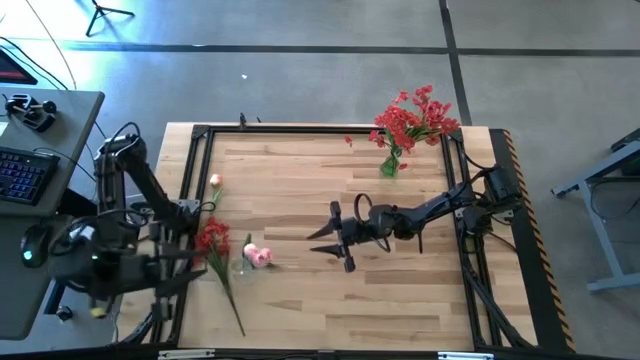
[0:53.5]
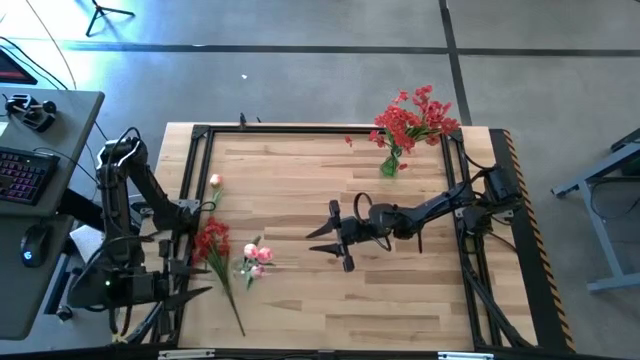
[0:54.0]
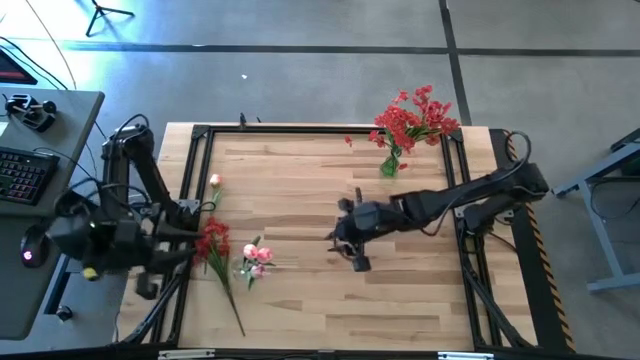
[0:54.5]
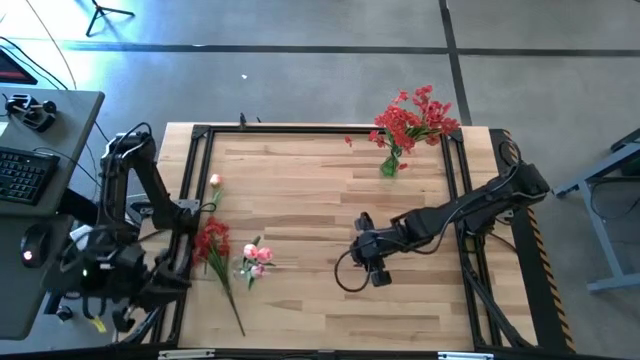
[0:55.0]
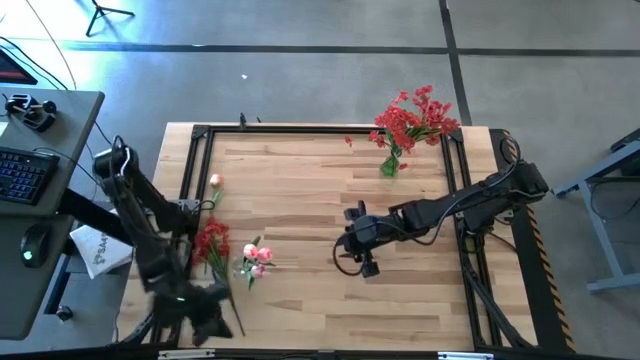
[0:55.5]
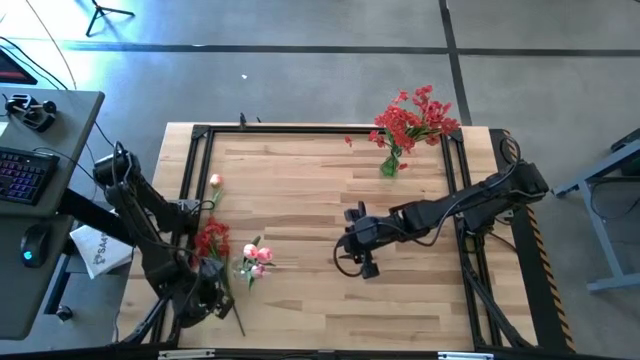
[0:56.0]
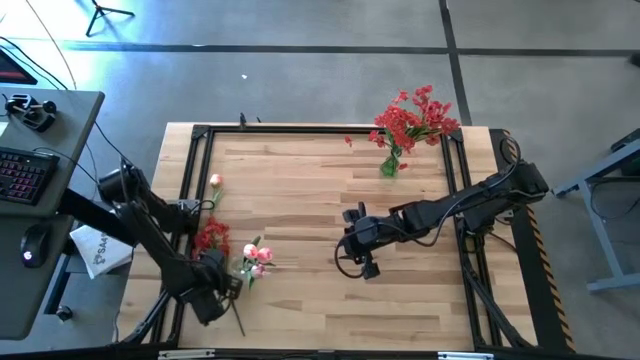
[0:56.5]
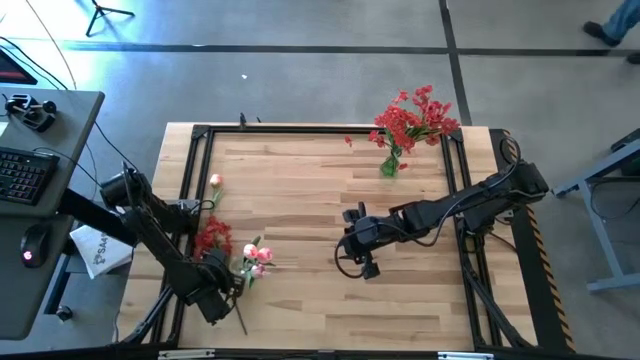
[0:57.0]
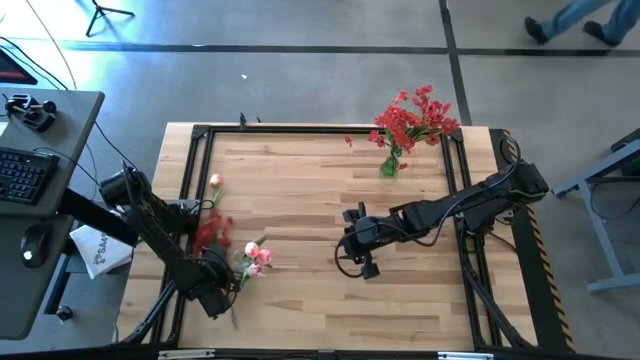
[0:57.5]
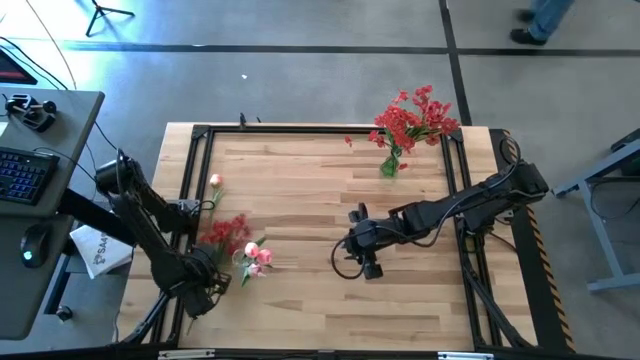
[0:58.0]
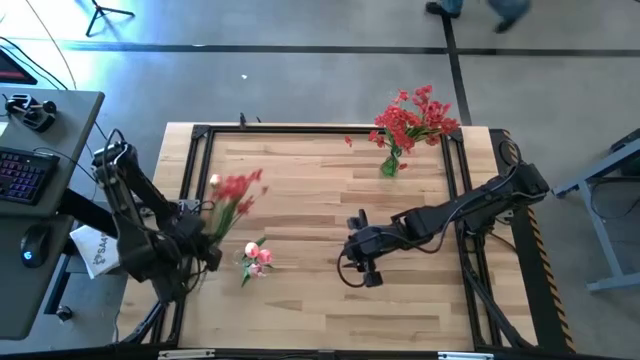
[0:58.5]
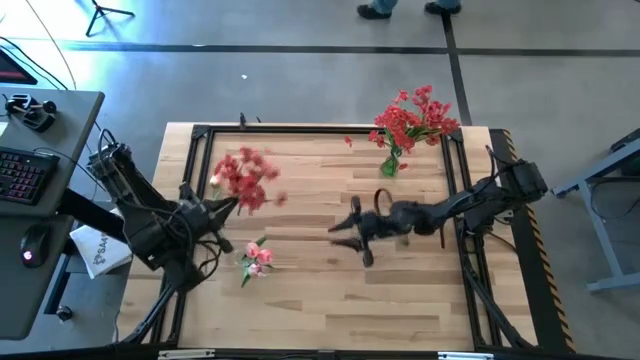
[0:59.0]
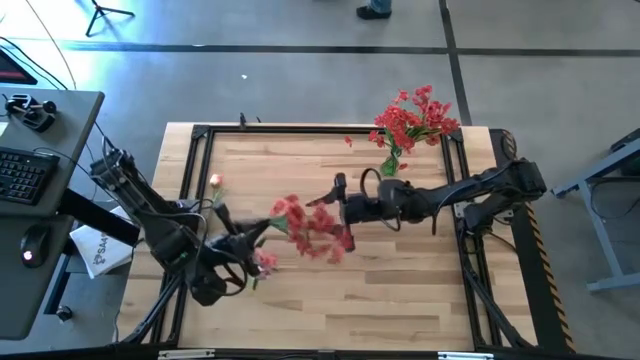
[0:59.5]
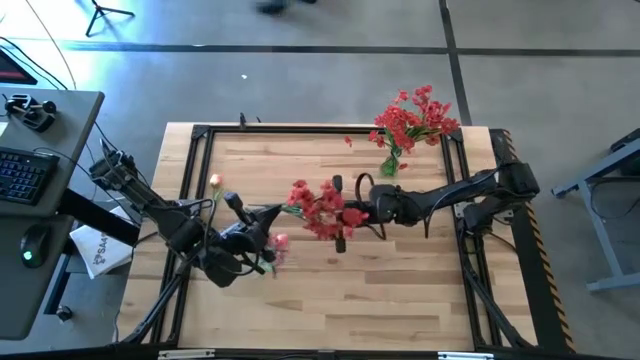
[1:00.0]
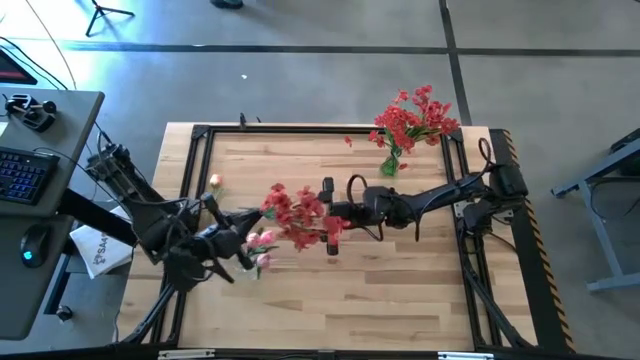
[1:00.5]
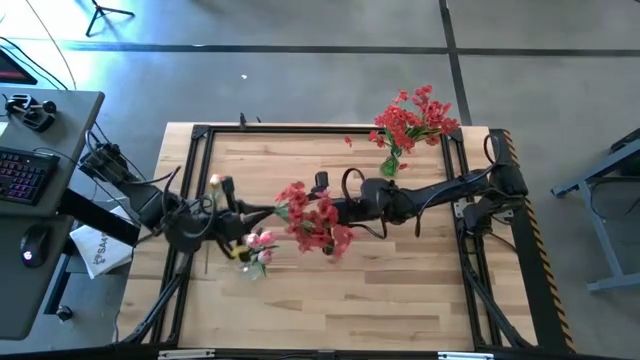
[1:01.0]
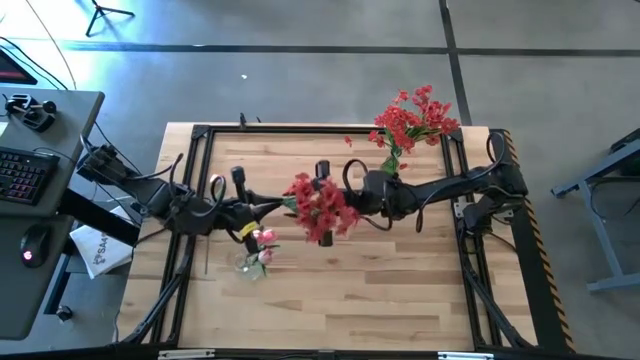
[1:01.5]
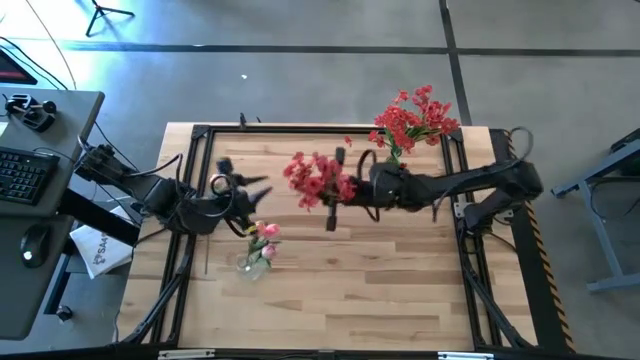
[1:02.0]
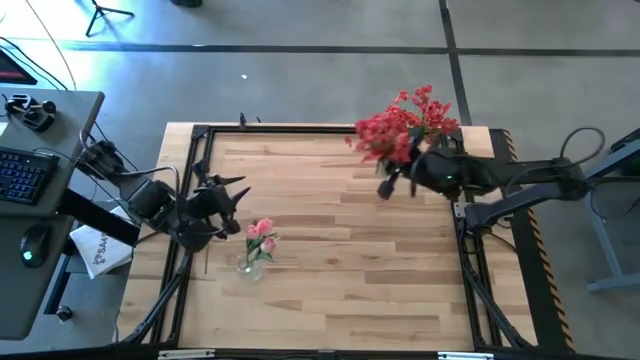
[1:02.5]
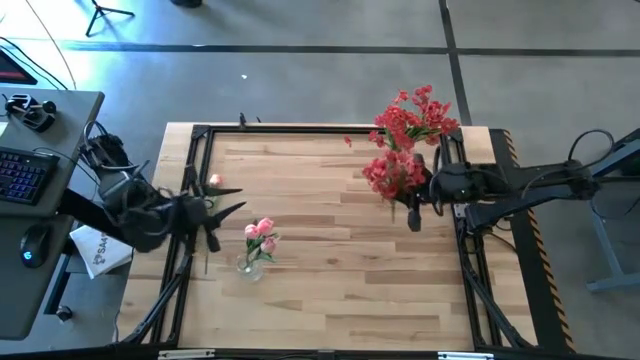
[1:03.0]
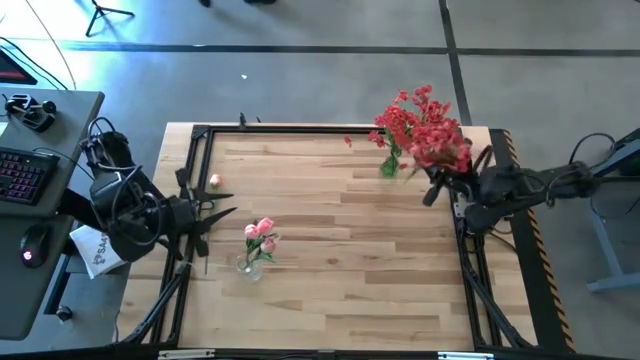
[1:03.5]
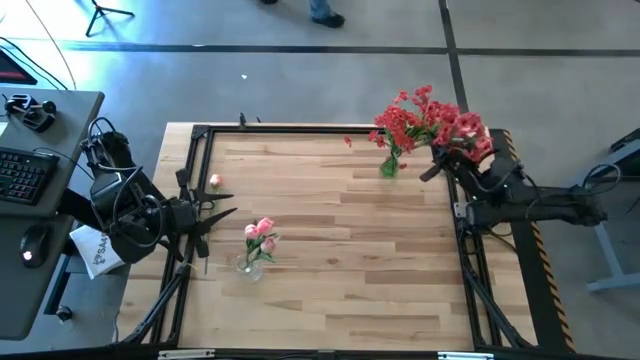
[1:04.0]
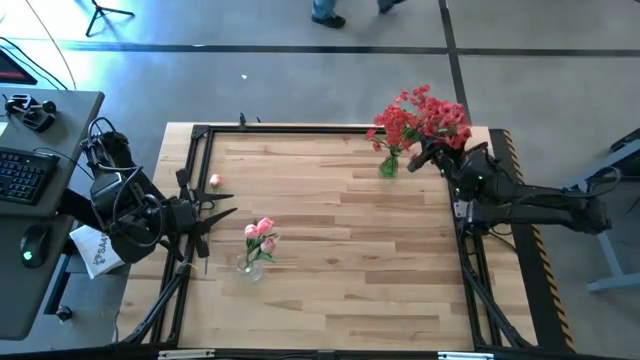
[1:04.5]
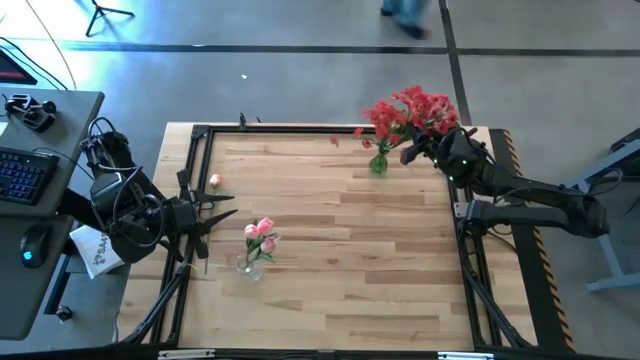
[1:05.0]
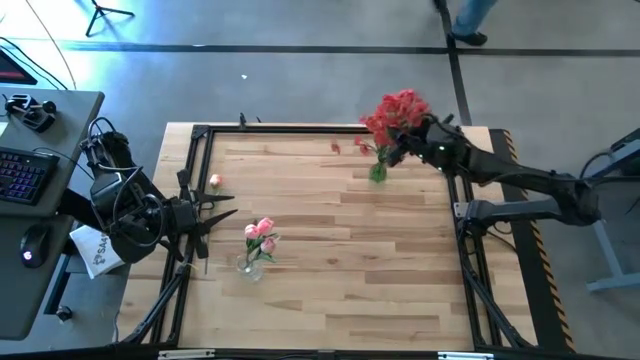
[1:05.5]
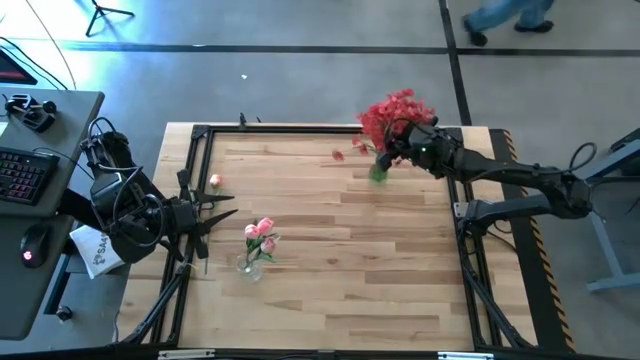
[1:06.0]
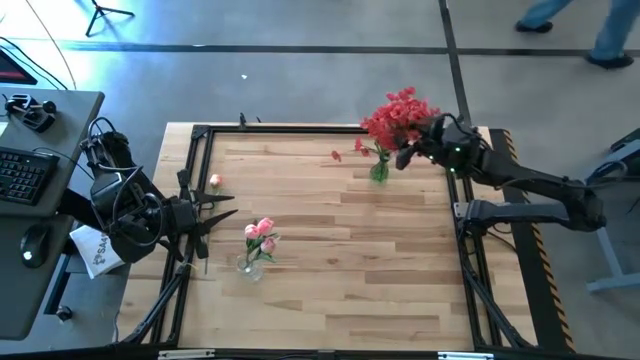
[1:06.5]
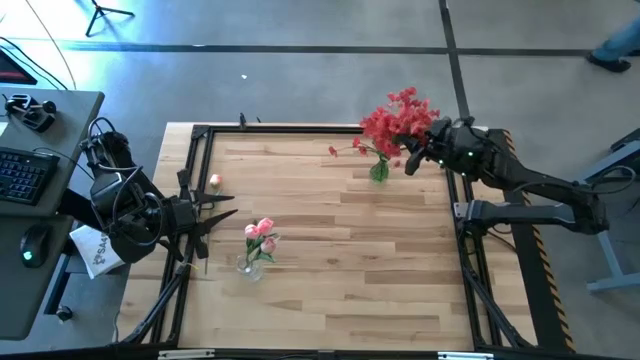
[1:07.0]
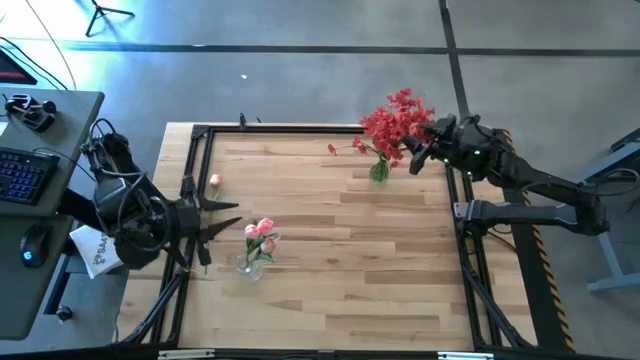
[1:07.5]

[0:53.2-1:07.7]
Task: Sort flowers into vase by color
Put the red flowers into the green vase

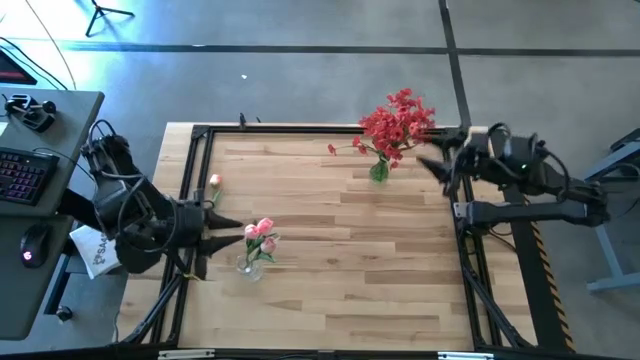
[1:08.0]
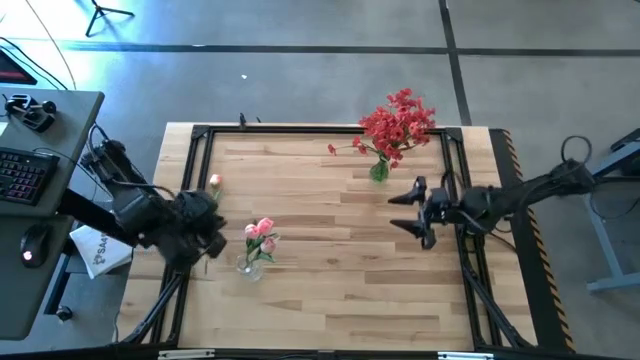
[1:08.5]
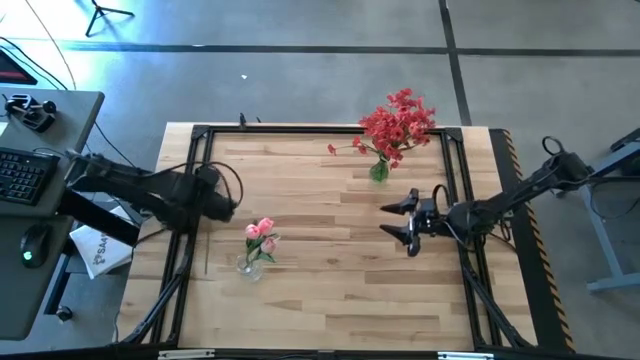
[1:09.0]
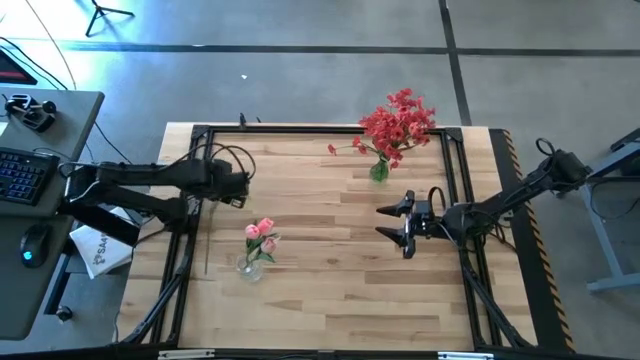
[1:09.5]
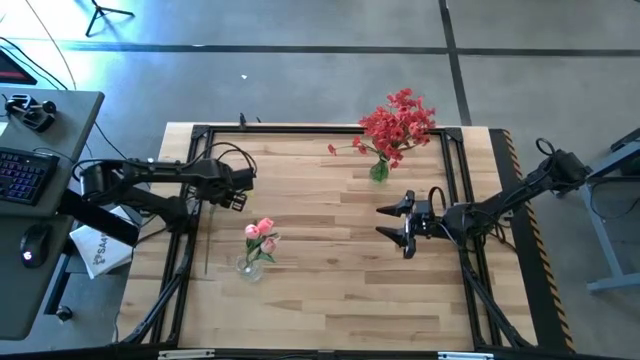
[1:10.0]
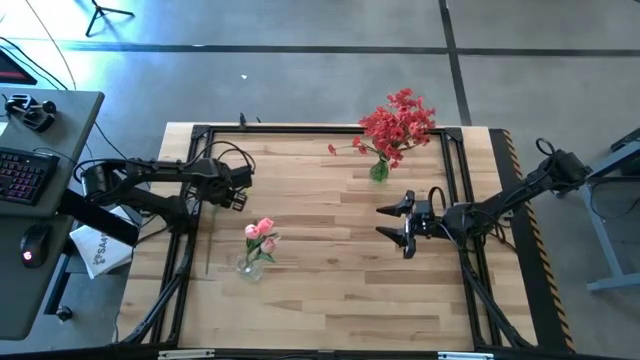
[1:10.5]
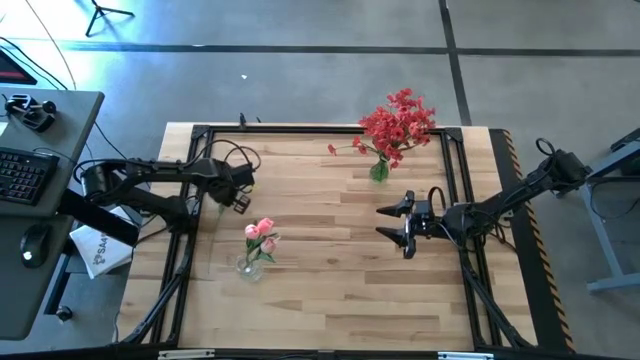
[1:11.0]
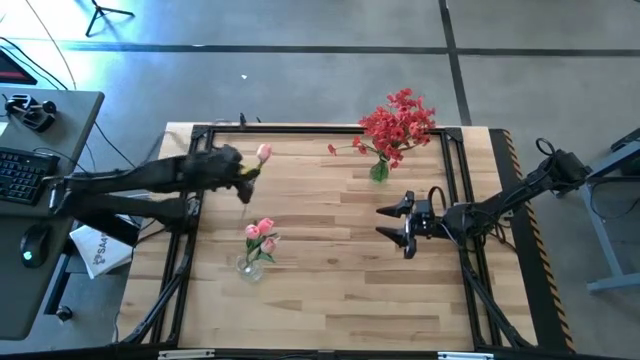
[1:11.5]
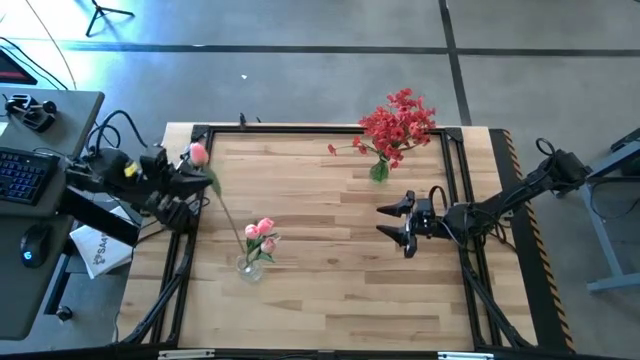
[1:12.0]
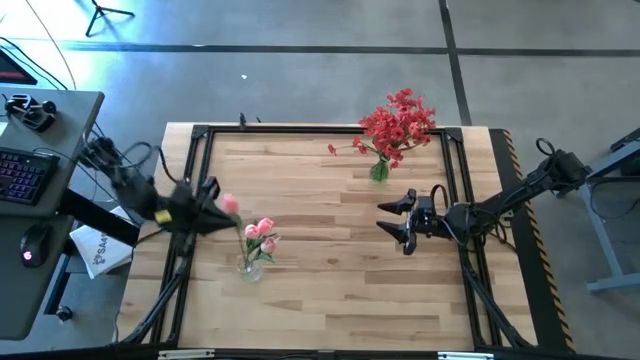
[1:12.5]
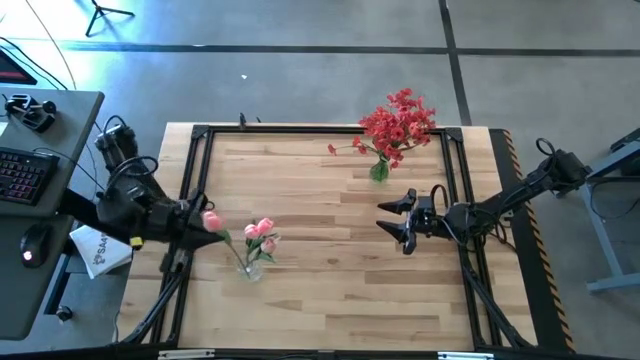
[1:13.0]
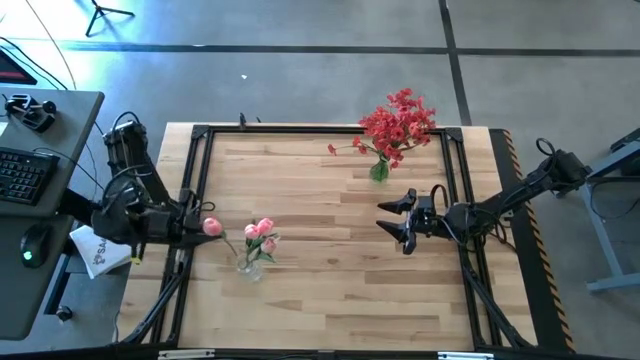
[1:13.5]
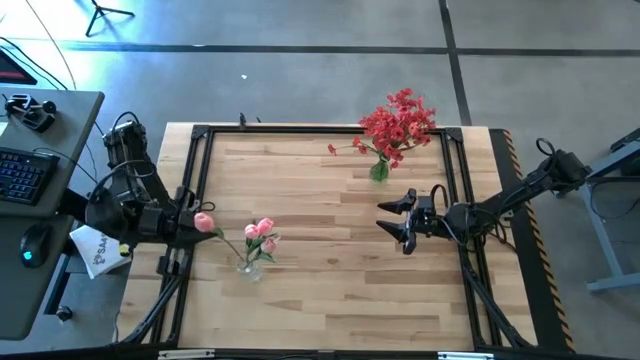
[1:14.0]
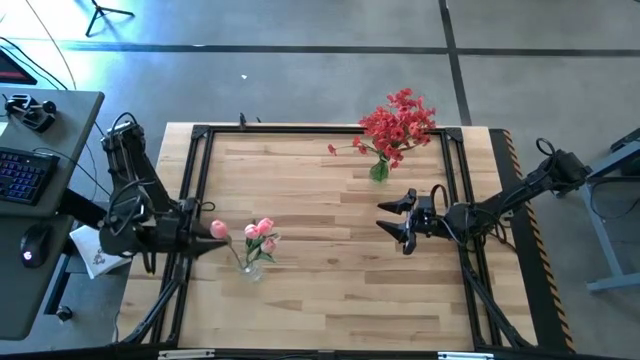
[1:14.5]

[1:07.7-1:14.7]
Put the pink flower into the transparent vase
